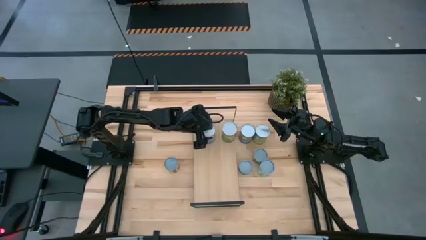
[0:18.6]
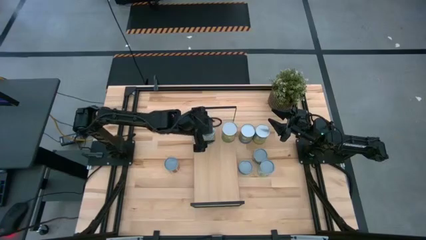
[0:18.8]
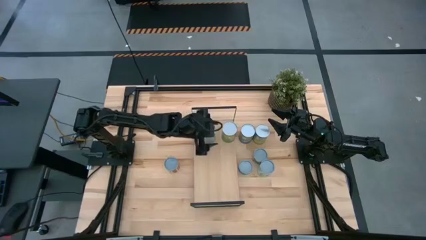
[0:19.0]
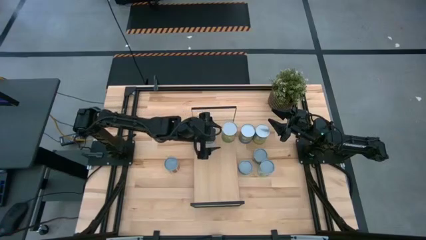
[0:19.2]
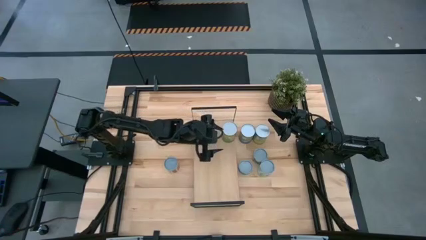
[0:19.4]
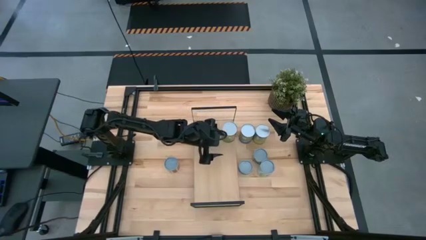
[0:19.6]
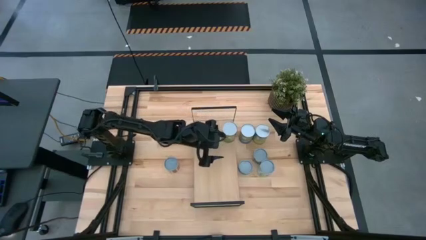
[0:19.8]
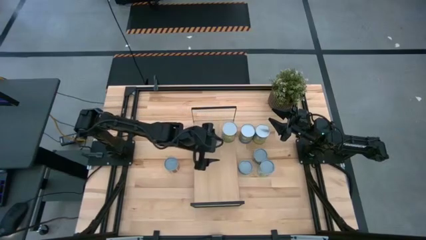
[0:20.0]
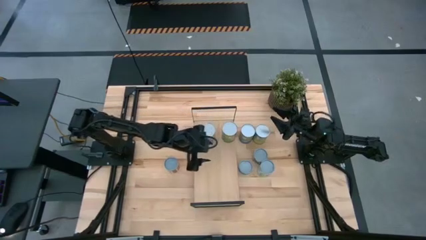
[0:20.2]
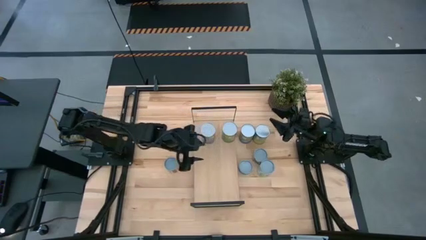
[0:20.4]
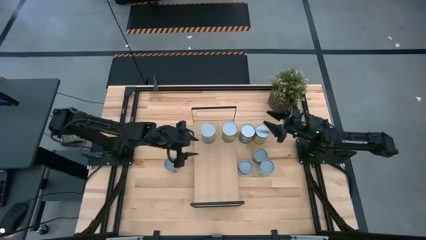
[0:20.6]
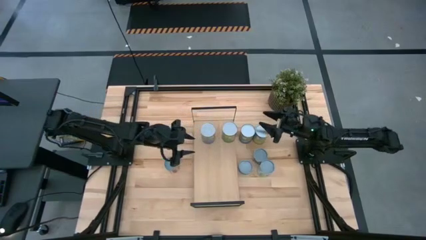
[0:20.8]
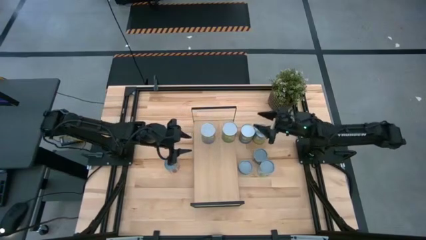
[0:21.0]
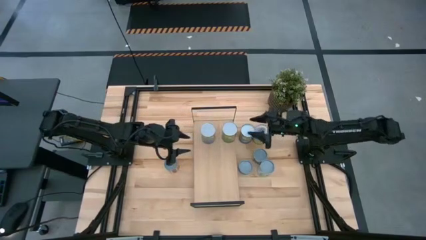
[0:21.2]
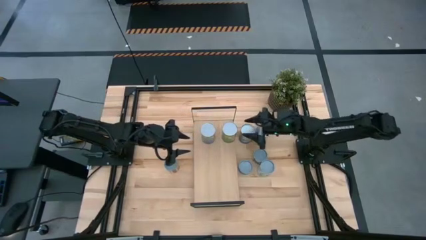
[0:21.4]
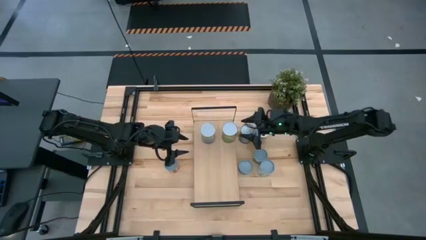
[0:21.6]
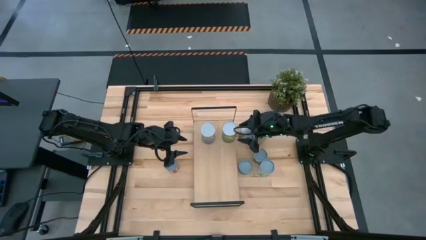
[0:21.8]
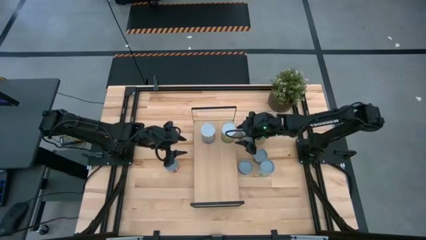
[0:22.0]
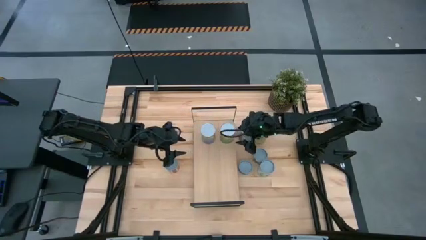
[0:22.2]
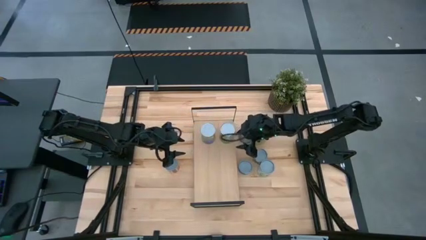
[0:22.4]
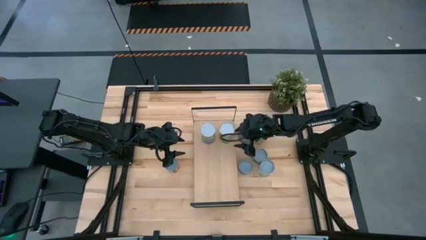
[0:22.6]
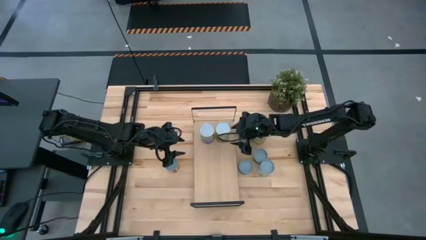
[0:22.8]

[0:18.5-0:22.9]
Task: Pick and place cans onto a shelf
Adjust the canned oranges on the shelf

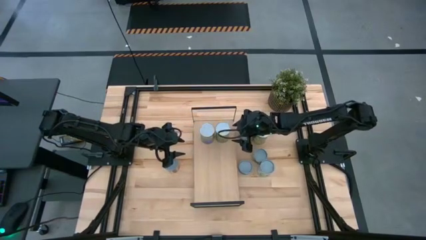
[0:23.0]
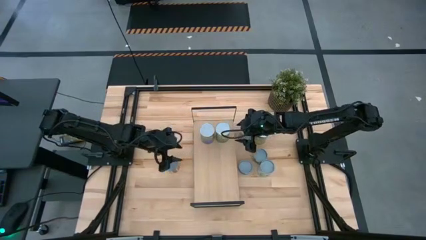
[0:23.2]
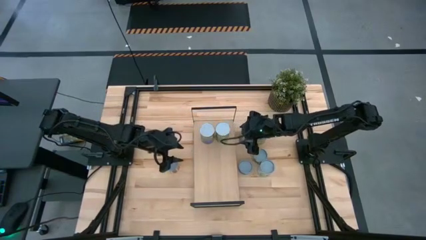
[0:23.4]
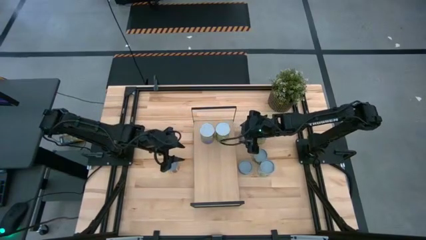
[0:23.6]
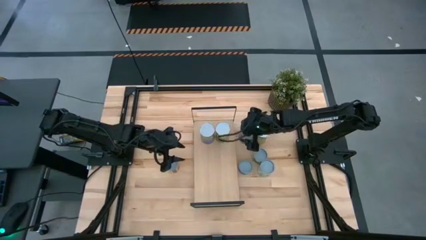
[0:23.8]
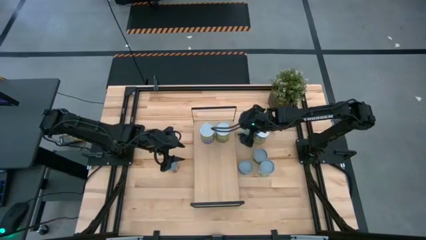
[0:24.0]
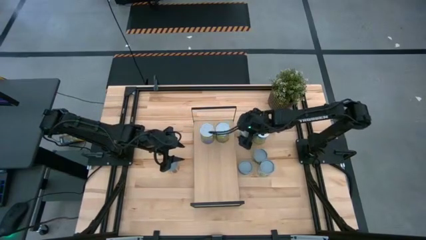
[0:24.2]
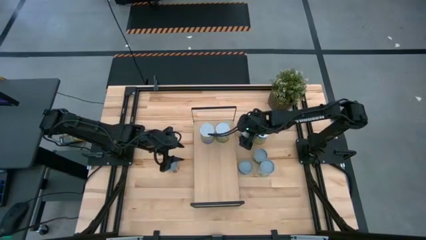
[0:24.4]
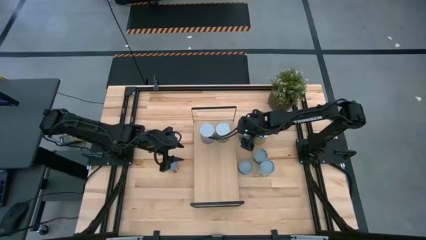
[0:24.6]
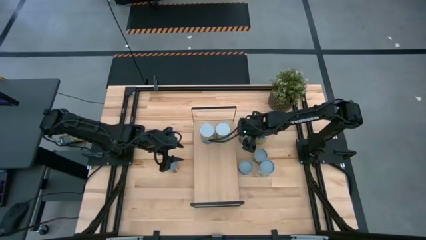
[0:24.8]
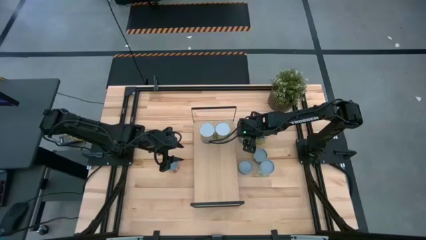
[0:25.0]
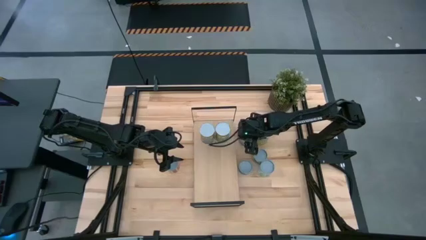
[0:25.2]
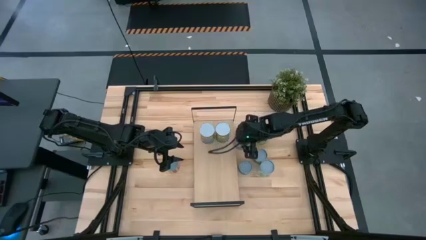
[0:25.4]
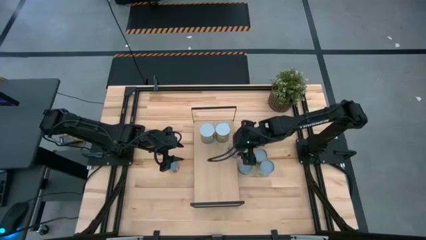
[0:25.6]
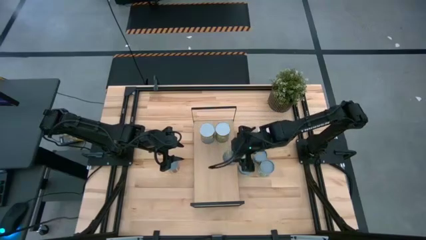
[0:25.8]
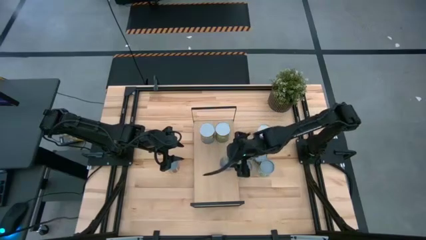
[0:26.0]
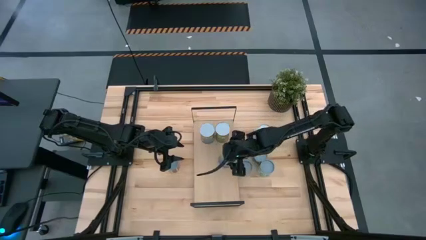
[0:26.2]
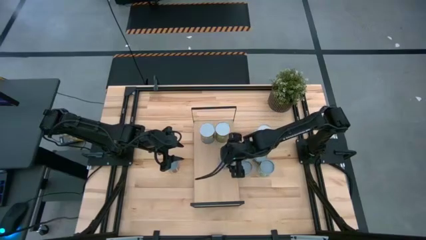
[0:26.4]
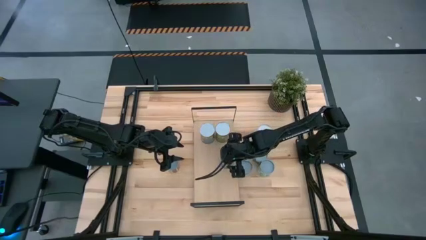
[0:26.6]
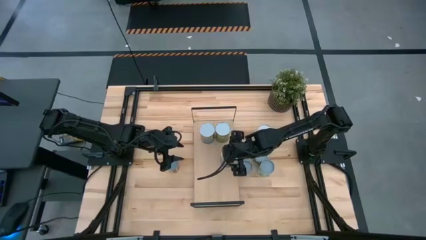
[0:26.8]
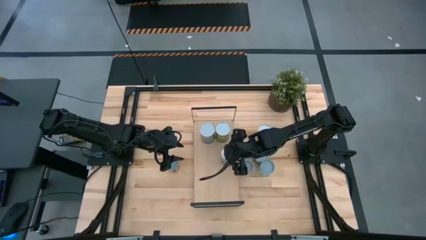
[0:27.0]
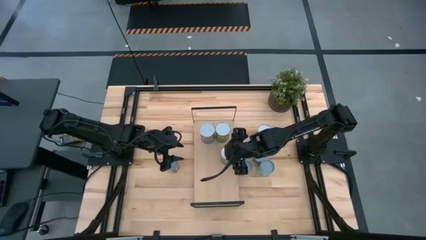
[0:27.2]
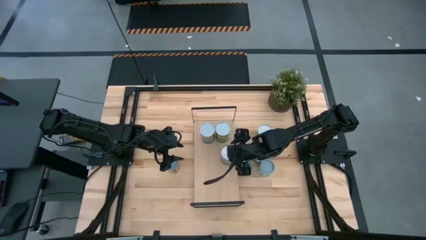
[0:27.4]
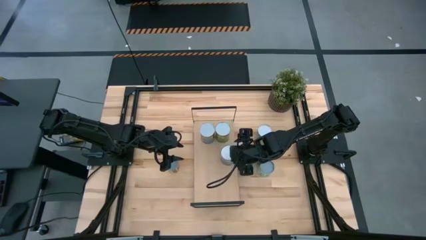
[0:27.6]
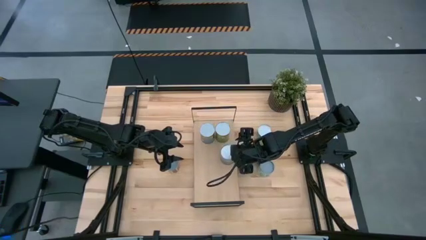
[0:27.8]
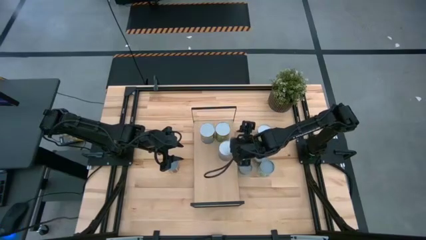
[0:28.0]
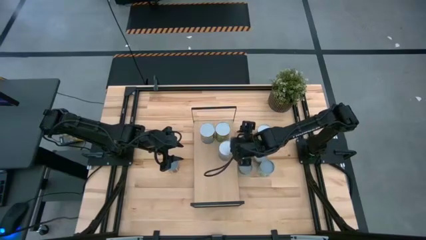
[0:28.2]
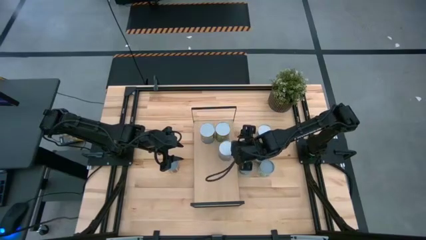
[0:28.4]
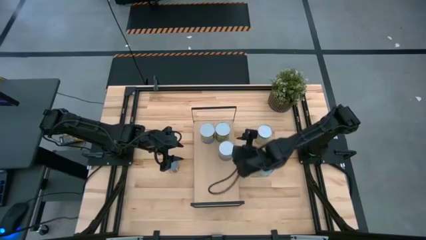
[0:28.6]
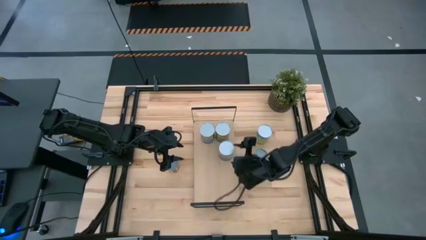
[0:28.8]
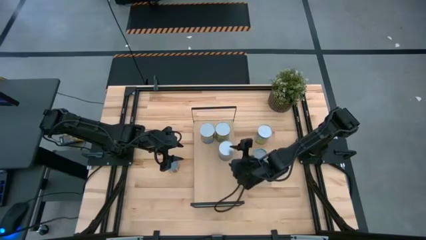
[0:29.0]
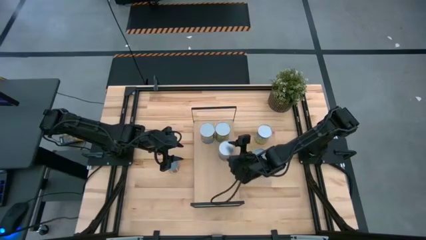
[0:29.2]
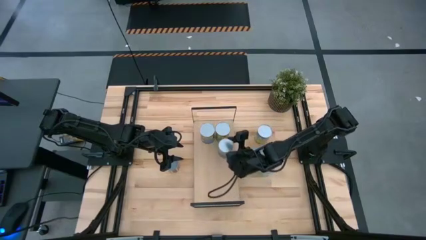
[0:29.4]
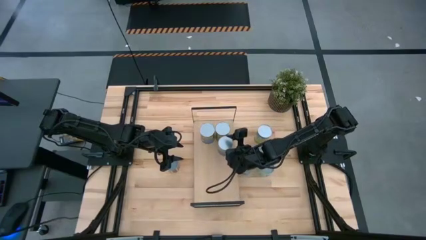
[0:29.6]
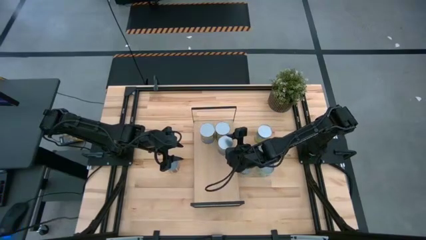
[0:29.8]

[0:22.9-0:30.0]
Put the canned peas on the shelf

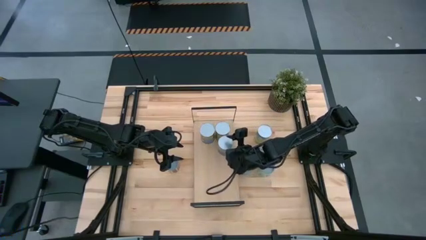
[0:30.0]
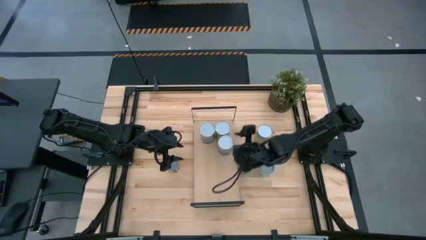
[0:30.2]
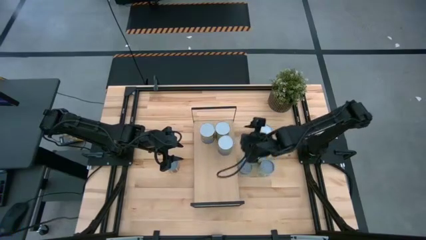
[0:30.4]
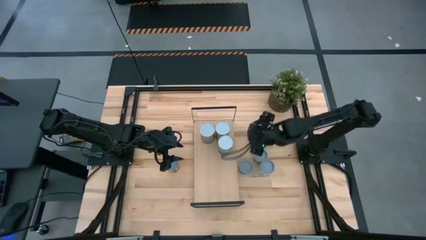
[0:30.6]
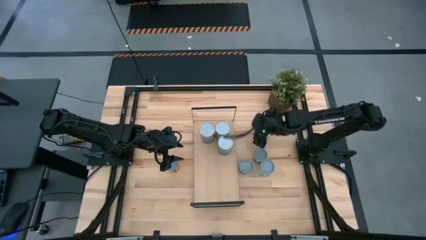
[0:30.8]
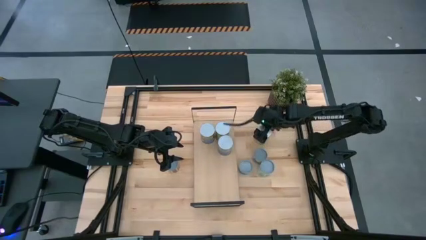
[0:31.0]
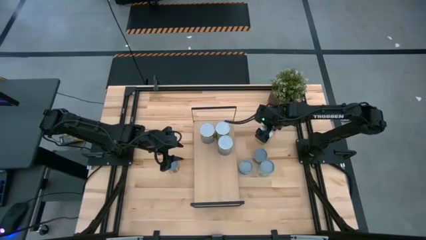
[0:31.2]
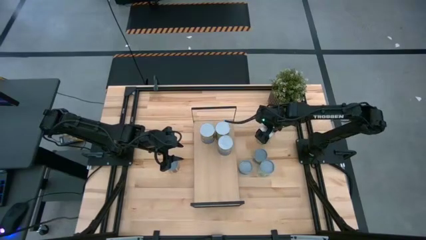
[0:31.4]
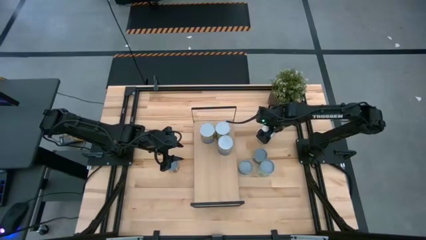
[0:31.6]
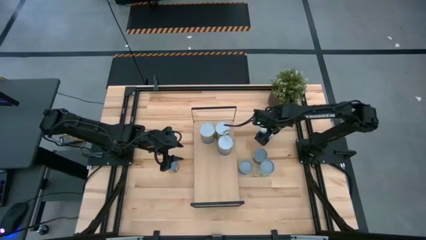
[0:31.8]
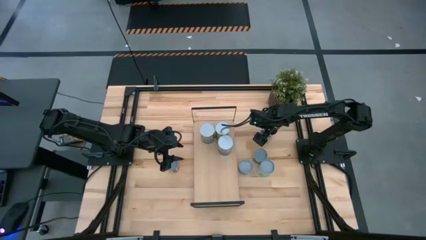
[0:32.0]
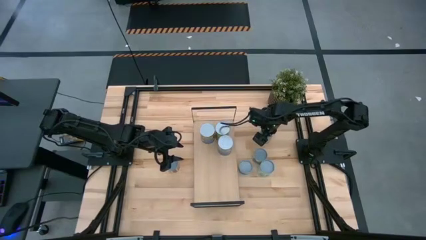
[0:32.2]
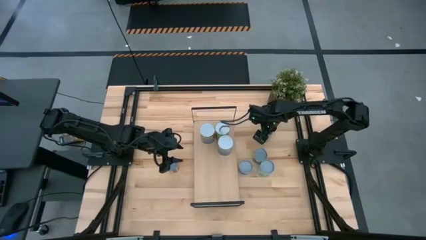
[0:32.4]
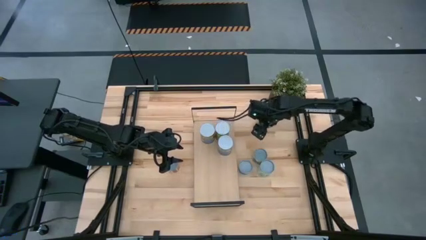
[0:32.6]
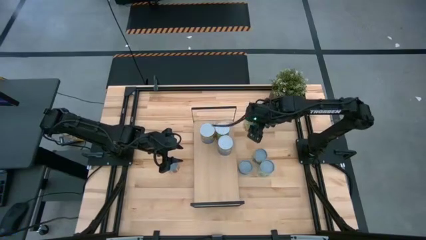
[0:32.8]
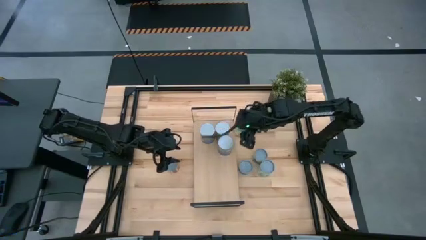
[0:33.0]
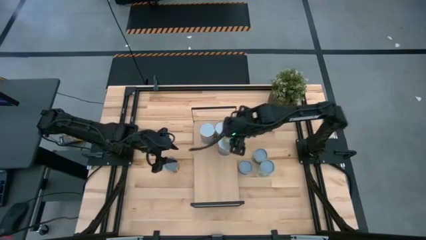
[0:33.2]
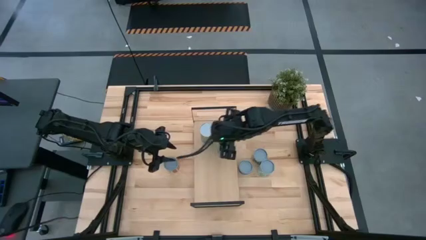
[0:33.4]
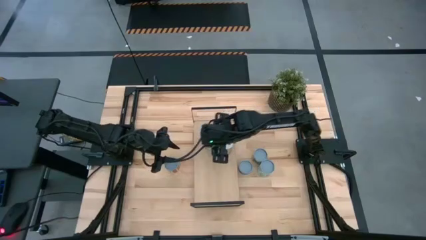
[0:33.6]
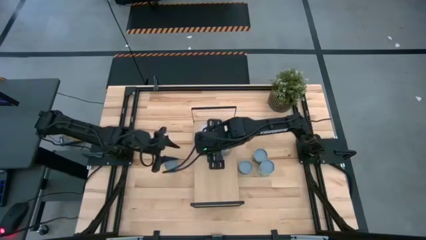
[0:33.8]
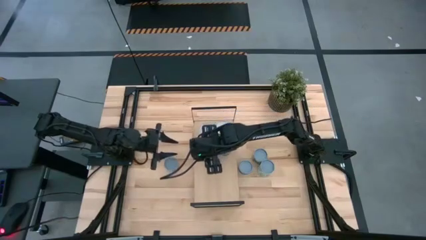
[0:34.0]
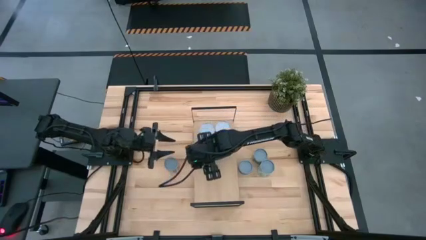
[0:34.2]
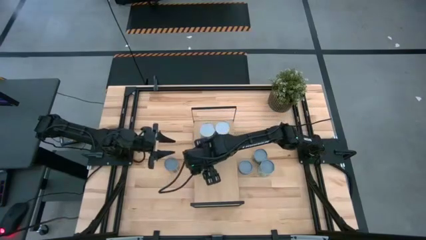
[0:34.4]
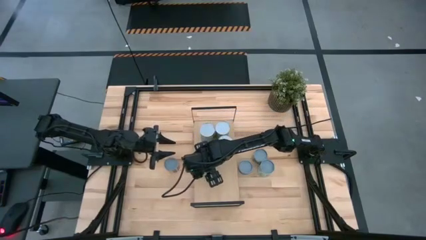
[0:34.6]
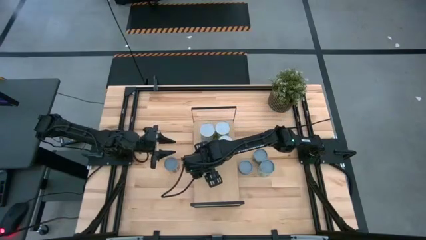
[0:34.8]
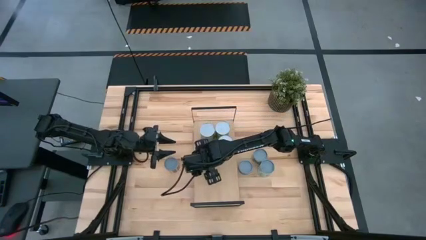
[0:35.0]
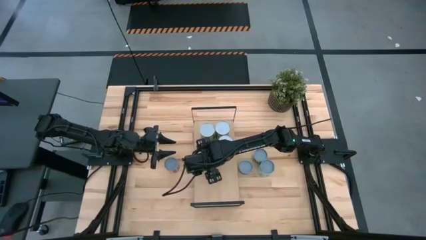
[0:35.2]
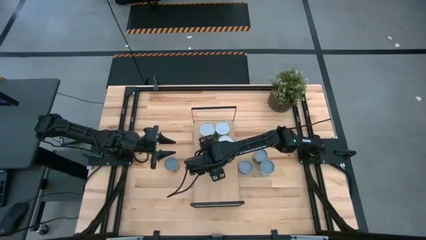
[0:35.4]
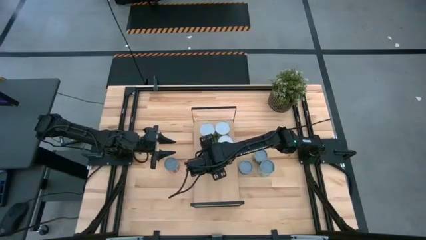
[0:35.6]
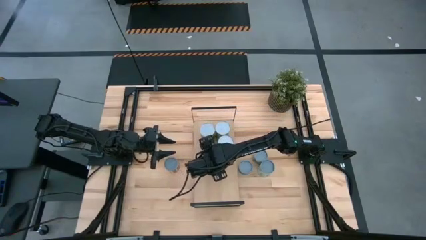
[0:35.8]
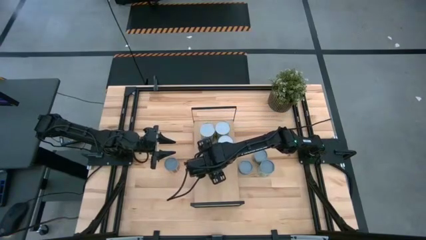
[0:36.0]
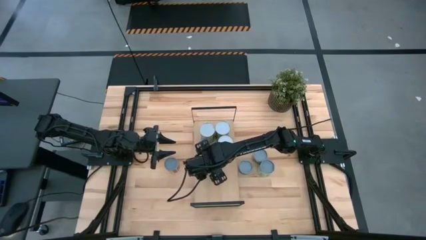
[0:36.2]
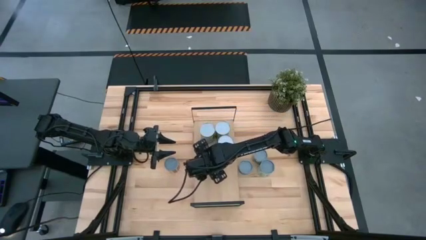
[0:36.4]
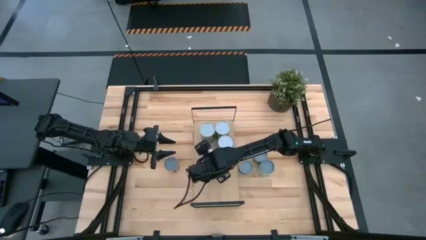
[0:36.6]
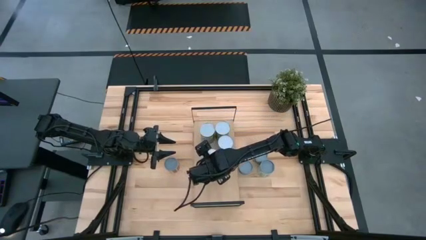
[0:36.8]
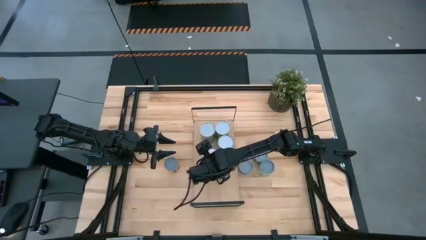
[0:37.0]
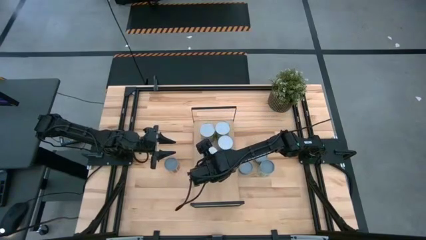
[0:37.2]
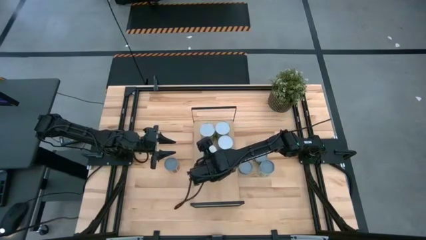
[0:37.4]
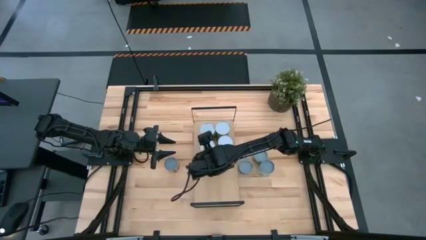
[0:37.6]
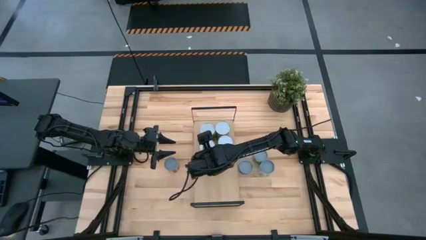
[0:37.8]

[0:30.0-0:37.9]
Put the canned carrots on the shelf
